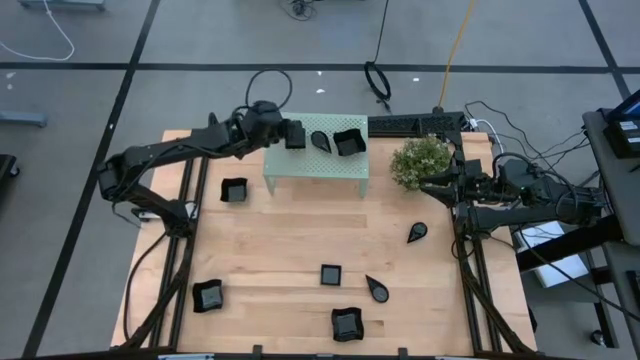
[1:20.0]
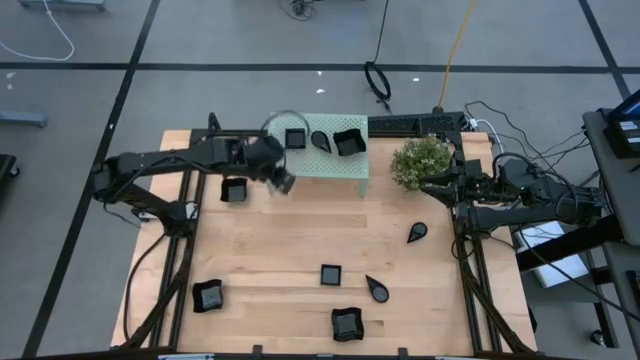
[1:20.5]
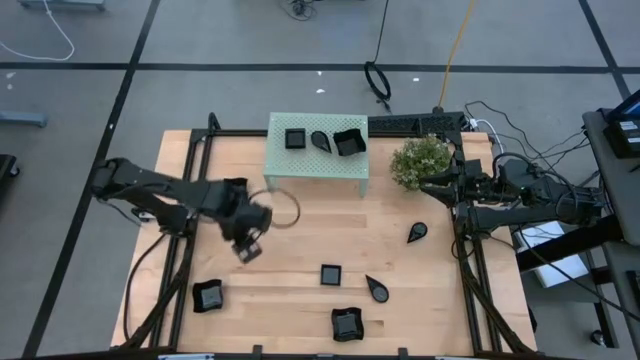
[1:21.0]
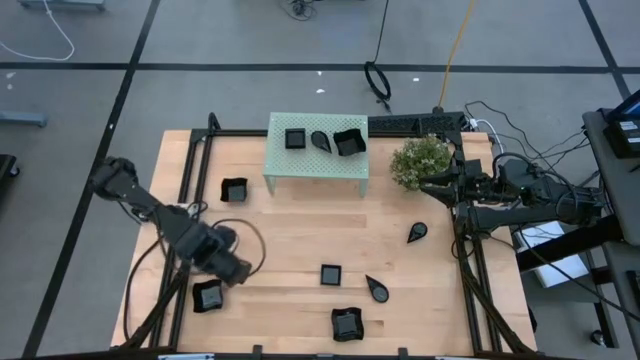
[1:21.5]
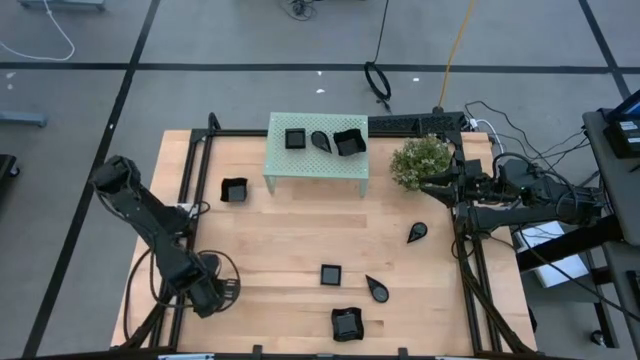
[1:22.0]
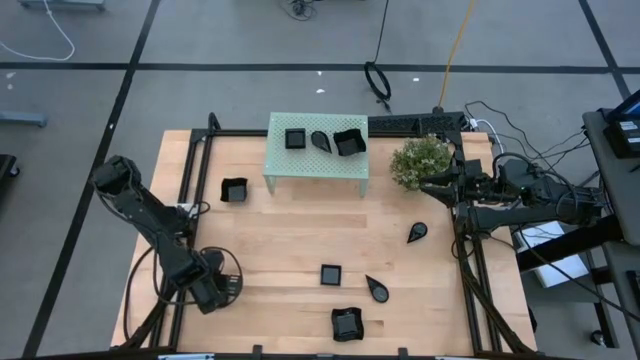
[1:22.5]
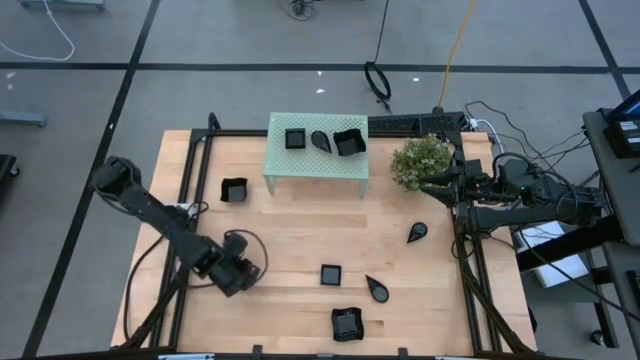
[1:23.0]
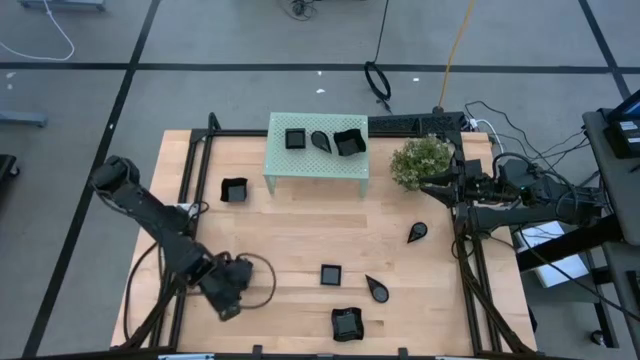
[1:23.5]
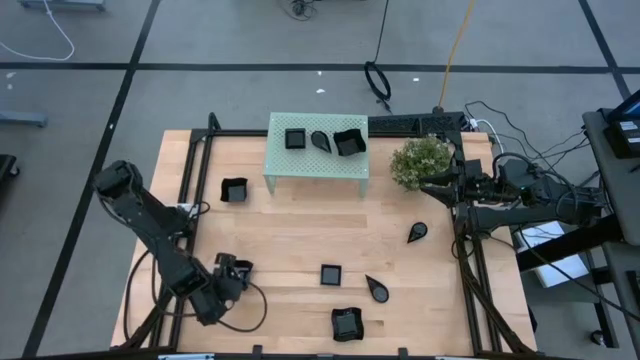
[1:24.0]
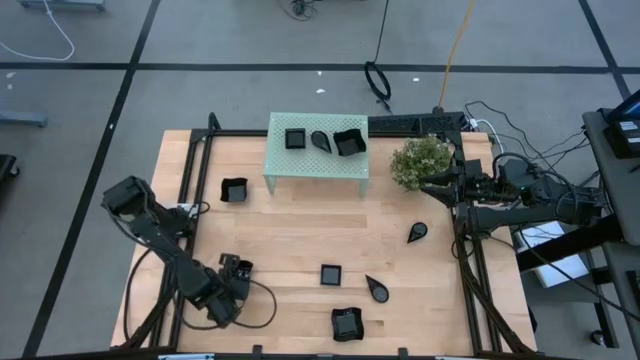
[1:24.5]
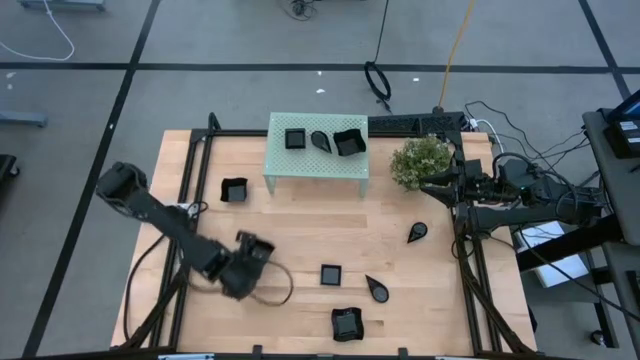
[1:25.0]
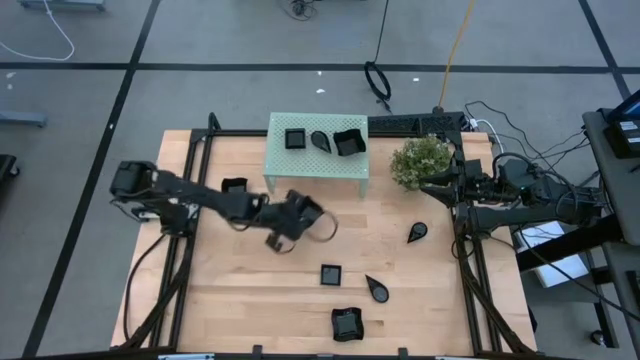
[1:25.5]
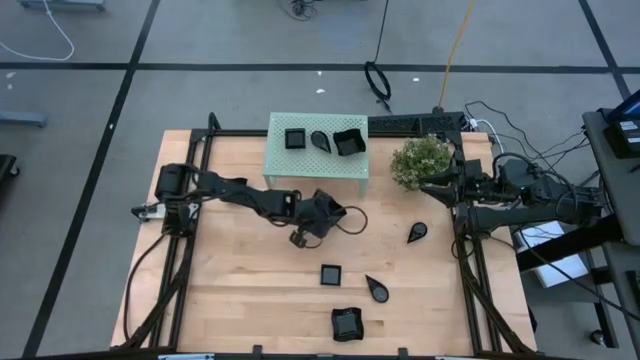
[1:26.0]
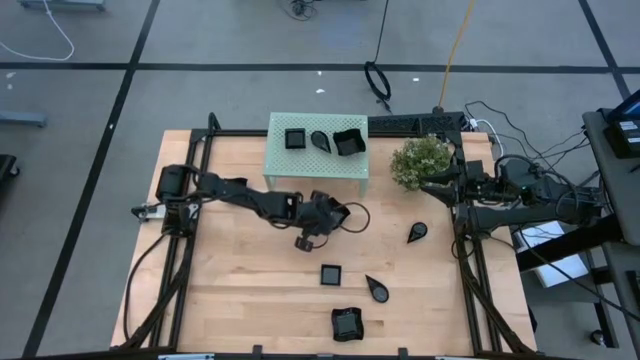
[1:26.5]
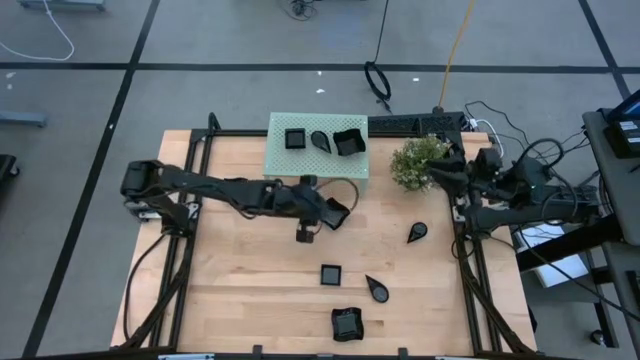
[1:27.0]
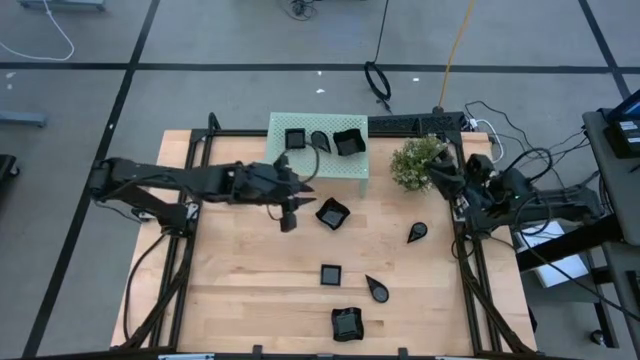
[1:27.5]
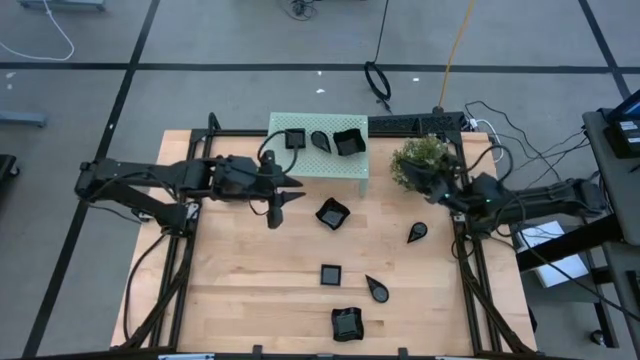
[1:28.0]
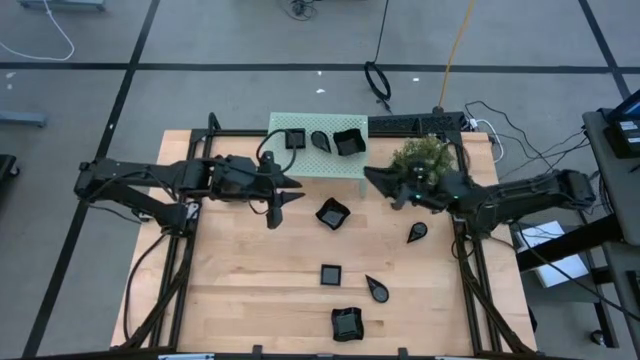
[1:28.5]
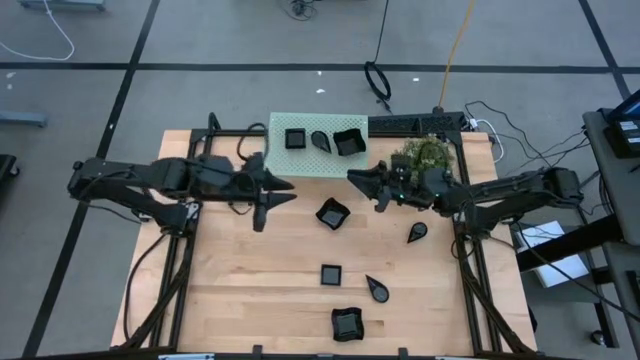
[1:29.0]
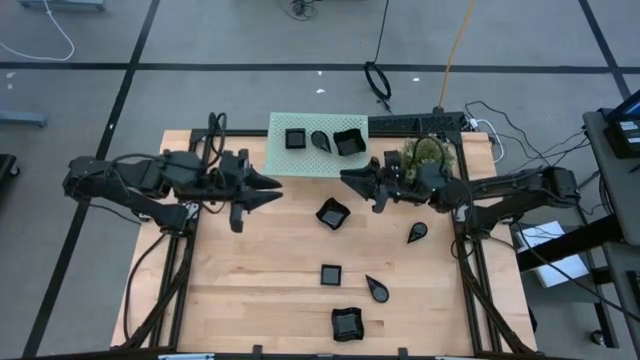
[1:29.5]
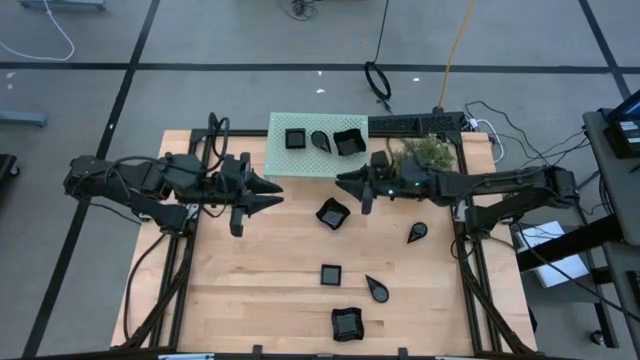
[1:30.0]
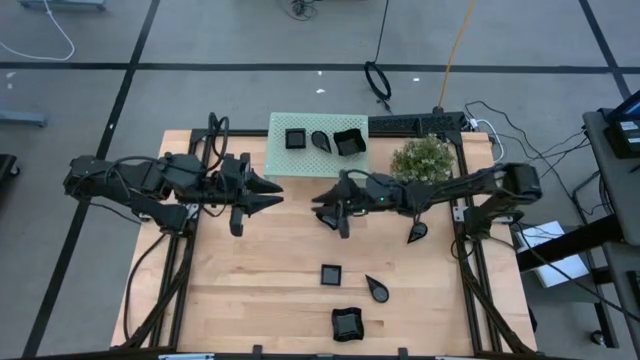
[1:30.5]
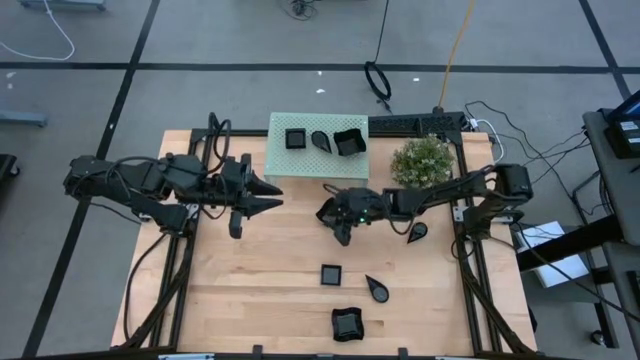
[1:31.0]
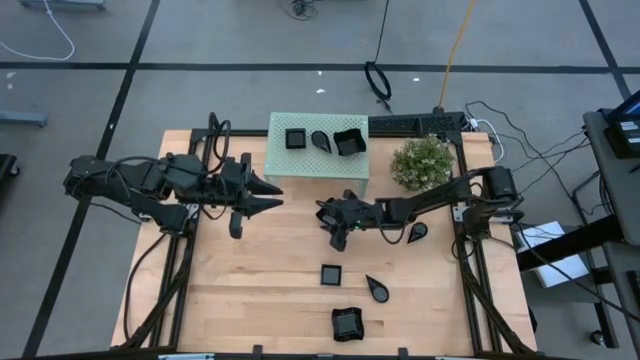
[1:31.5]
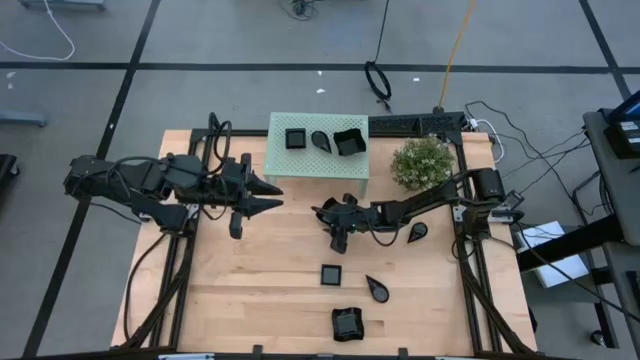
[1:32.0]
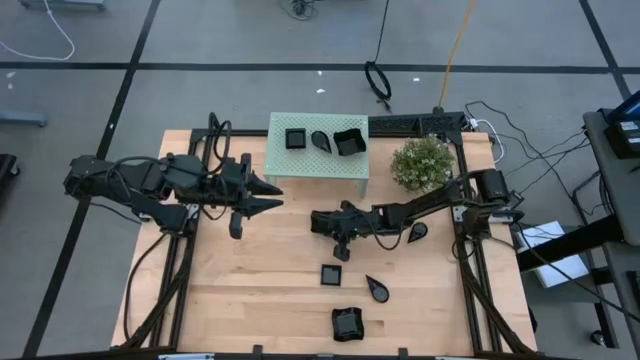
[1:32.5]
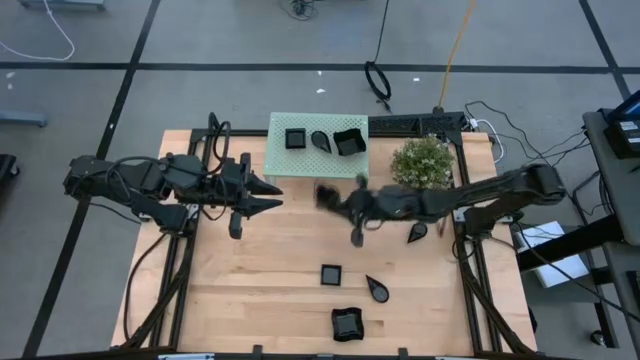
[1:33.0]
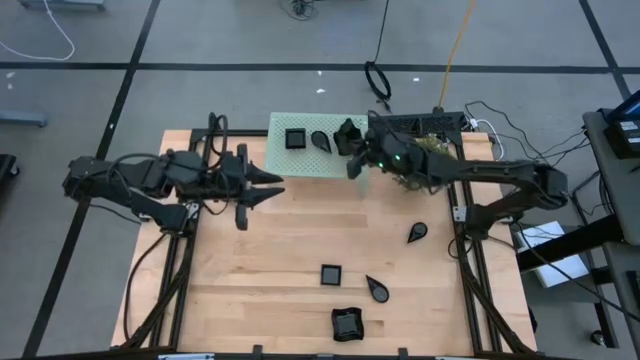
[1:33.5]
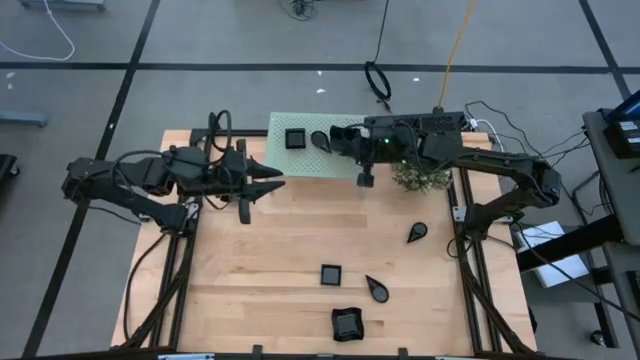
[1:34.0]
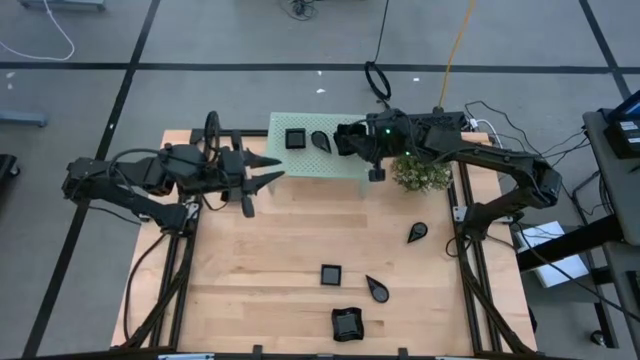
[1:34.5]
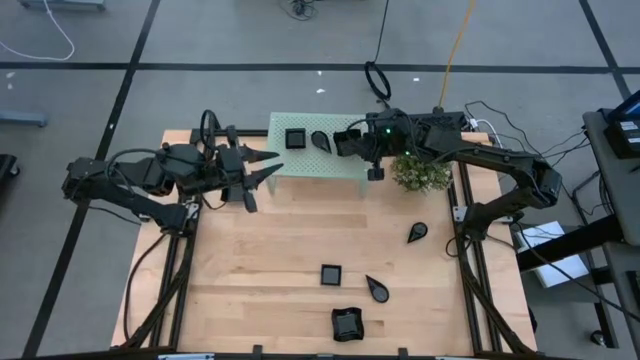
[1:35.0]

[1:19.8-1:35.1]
Task: Pick & Place Mini shaped plates
Stack the black distorted square plate on top of the other black distorted square plate on the shelf

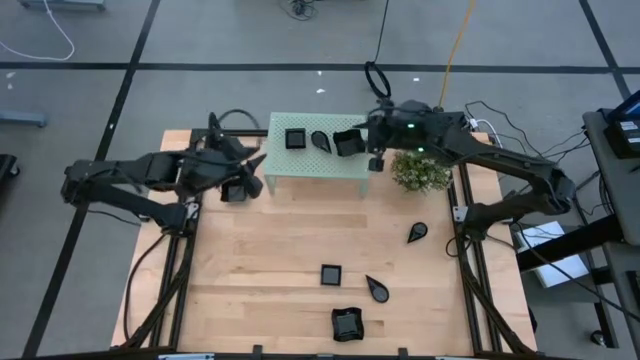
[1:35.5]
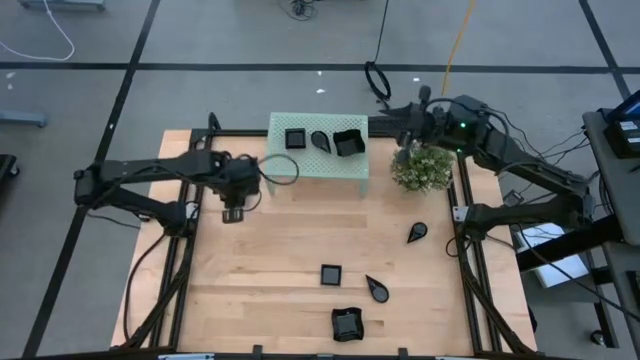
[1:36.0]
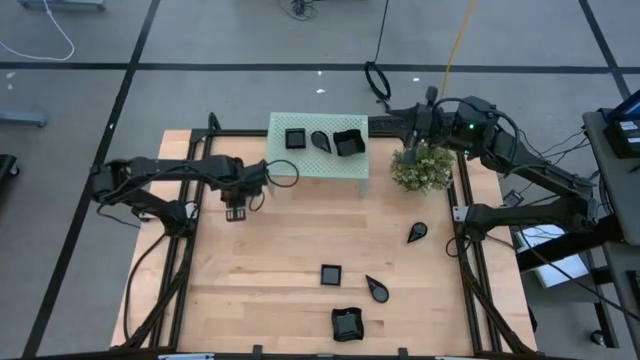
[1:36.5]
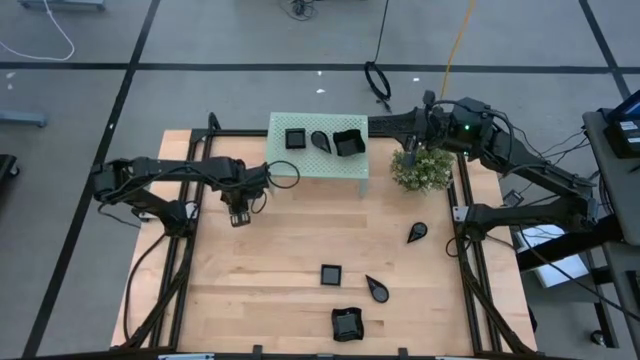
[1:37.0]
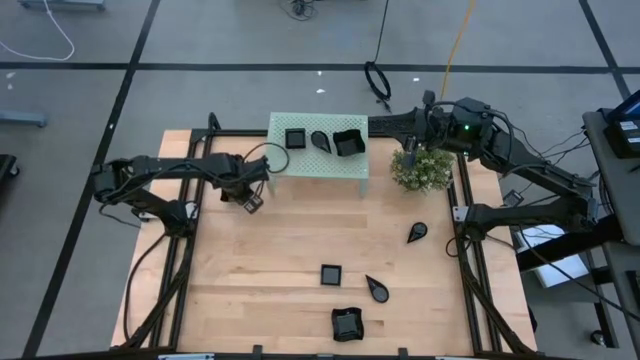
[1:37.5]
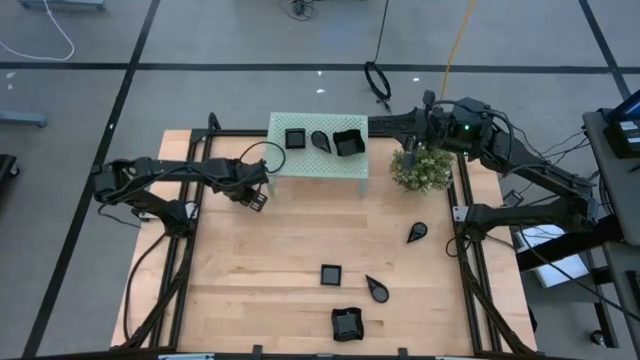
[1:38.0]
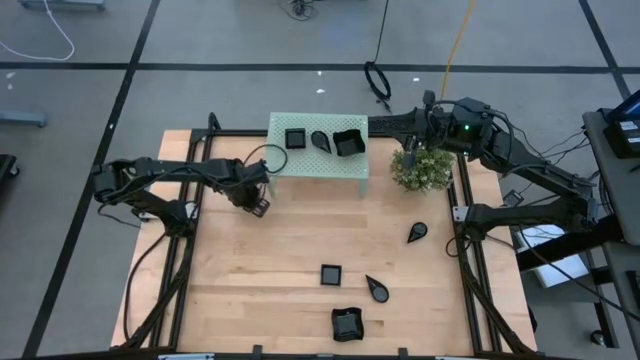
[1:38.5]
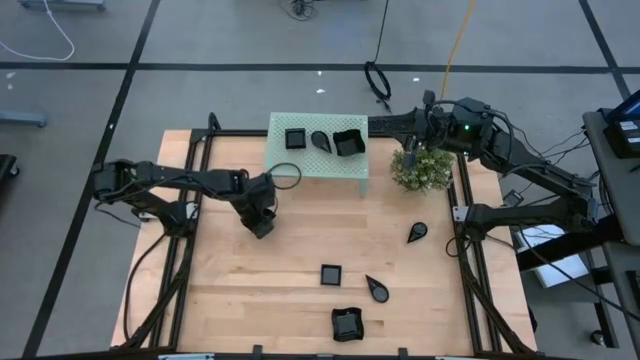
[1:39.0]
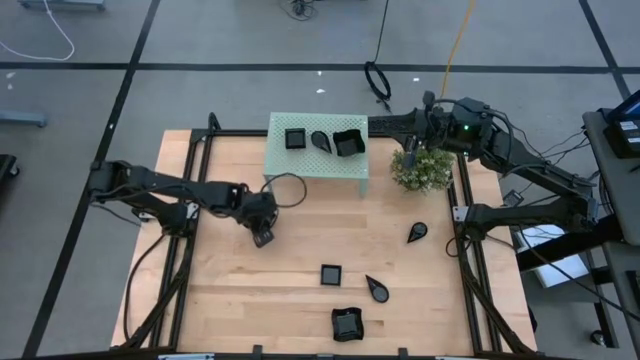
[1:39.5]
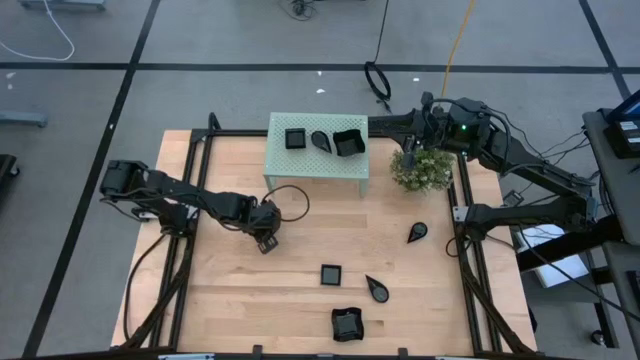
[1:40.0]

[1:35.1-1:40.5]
Stack the black distorted square plate on top of the other black distorted square plate on the shelf
